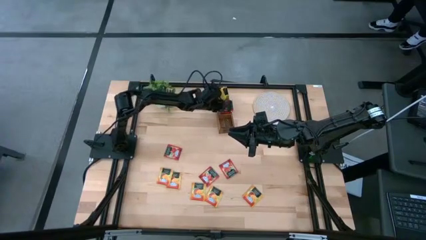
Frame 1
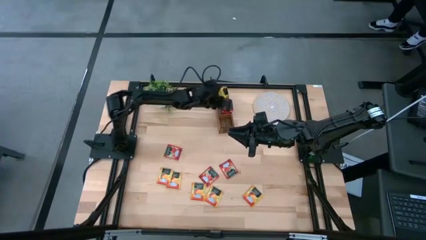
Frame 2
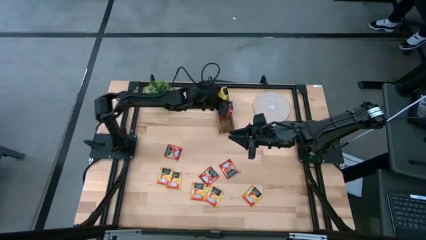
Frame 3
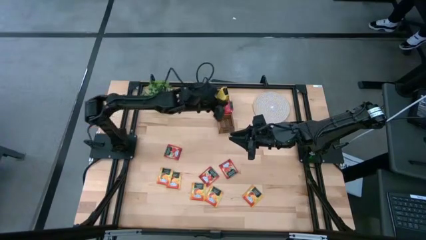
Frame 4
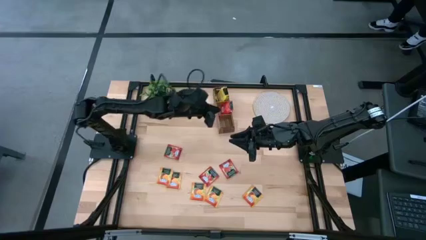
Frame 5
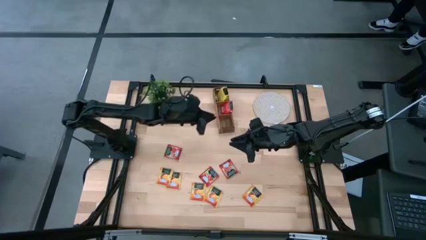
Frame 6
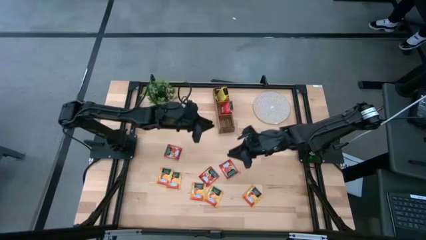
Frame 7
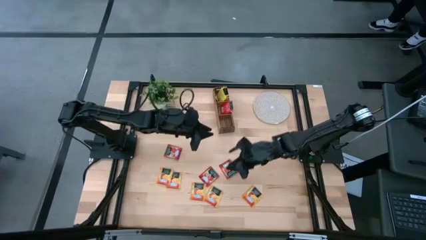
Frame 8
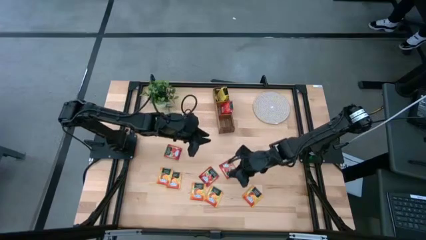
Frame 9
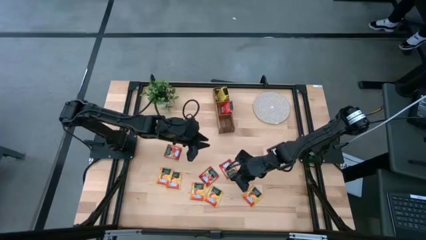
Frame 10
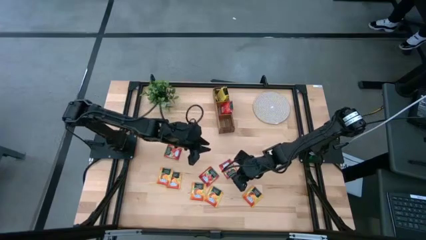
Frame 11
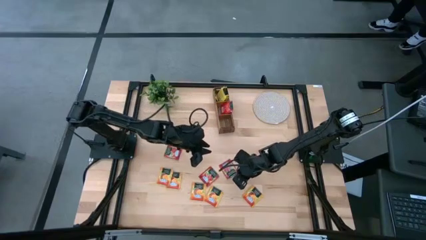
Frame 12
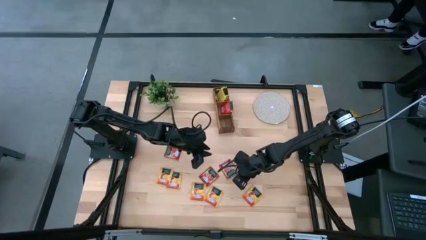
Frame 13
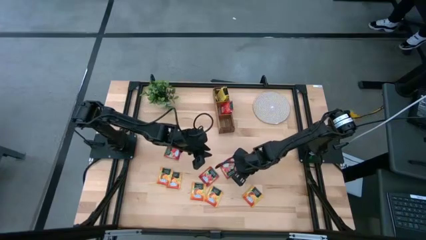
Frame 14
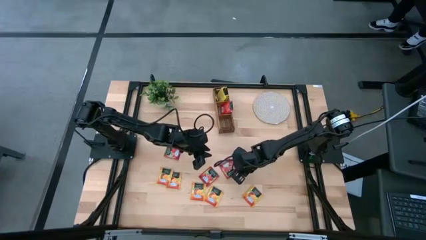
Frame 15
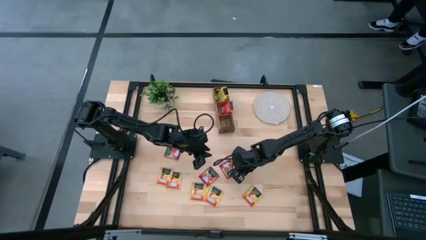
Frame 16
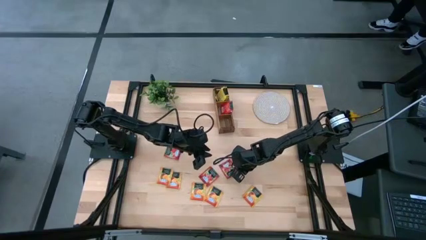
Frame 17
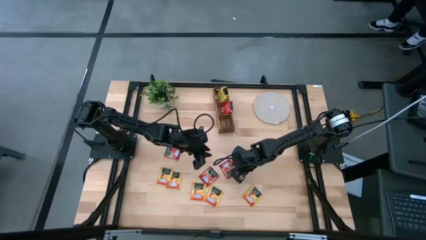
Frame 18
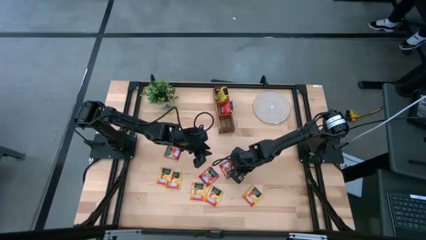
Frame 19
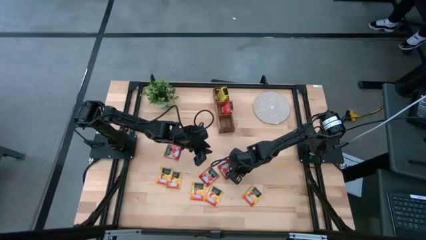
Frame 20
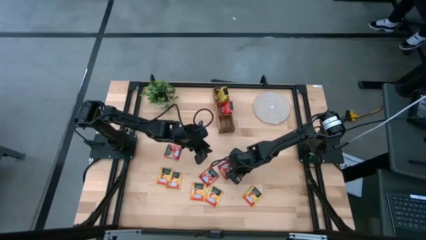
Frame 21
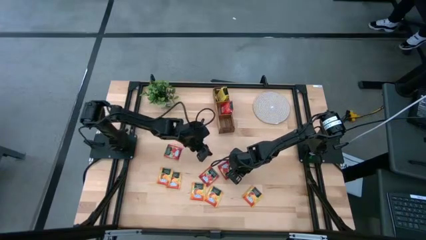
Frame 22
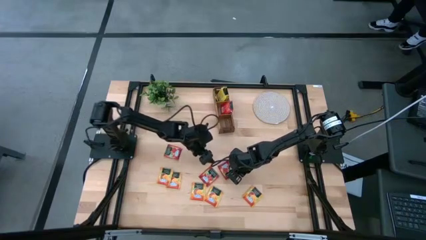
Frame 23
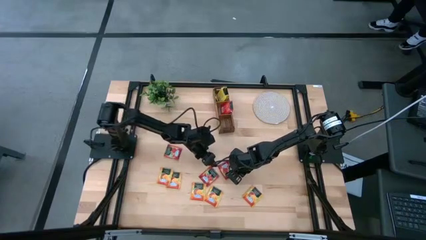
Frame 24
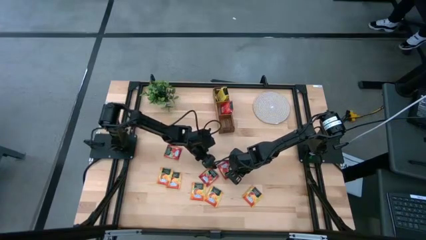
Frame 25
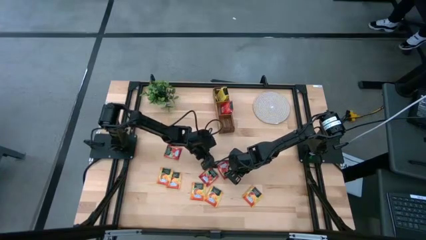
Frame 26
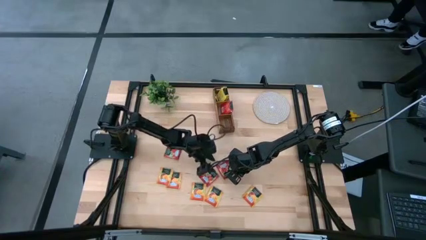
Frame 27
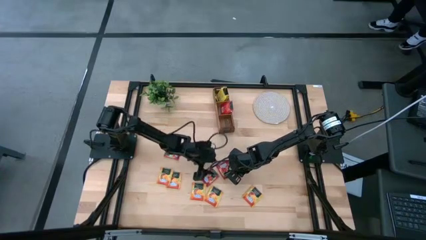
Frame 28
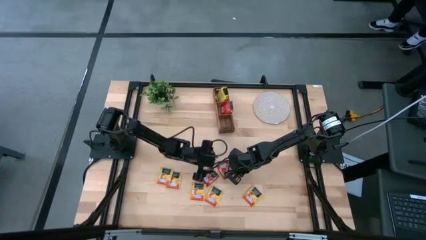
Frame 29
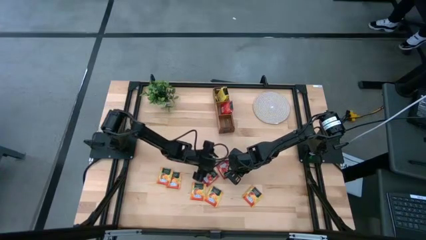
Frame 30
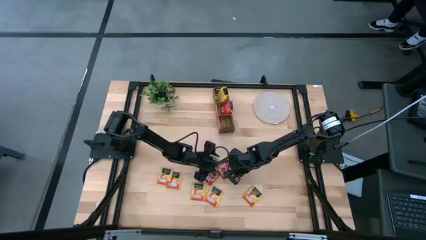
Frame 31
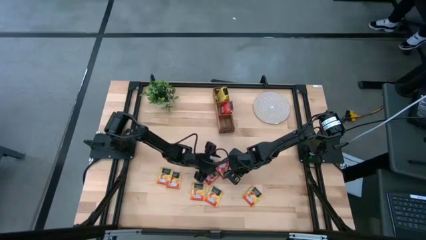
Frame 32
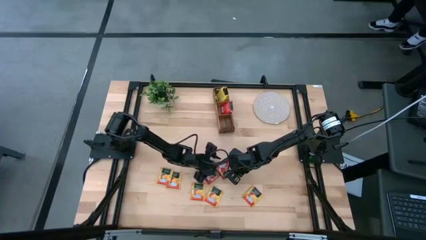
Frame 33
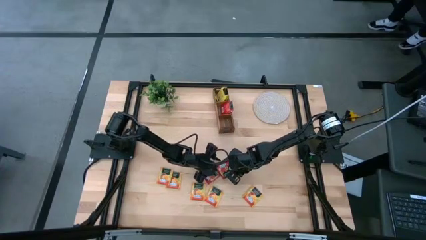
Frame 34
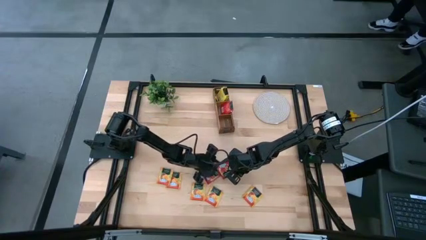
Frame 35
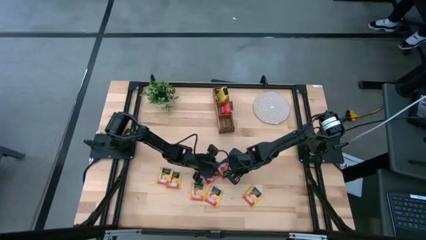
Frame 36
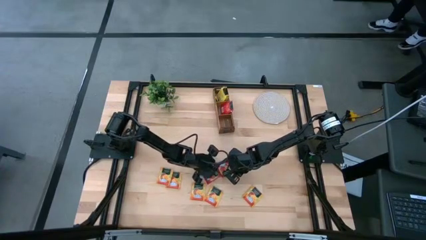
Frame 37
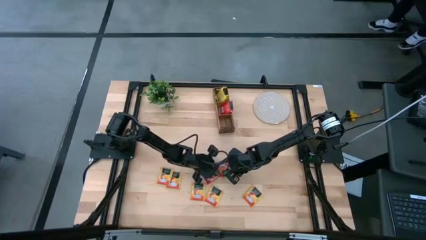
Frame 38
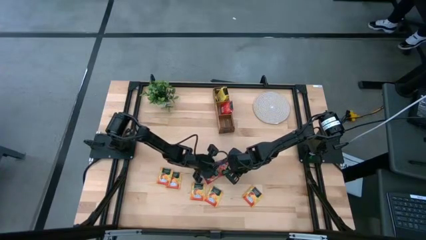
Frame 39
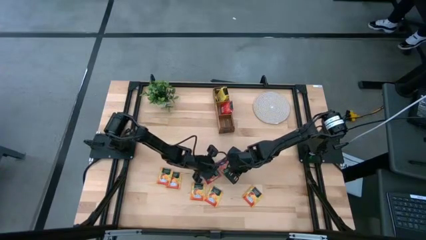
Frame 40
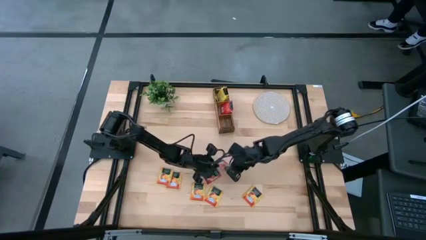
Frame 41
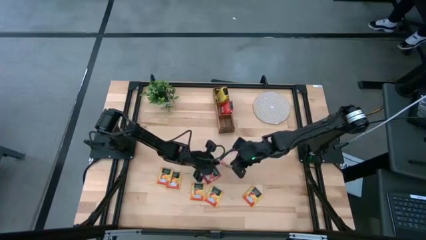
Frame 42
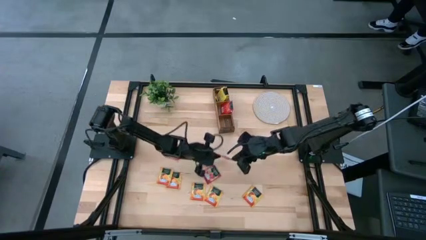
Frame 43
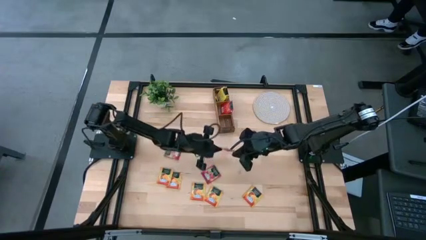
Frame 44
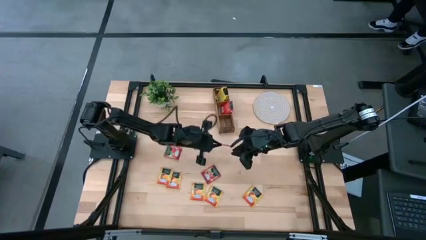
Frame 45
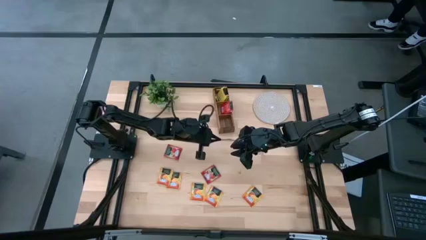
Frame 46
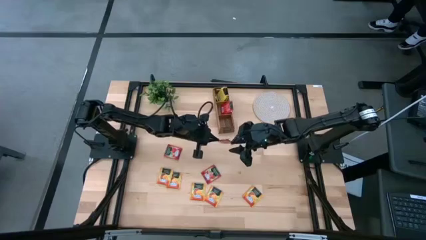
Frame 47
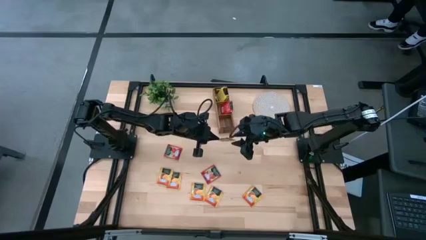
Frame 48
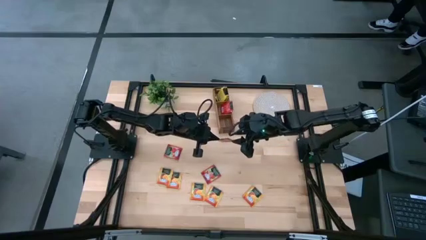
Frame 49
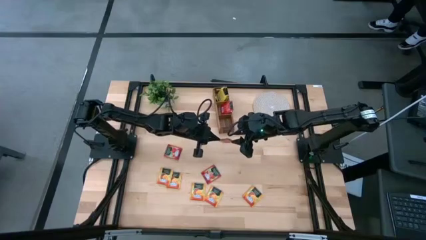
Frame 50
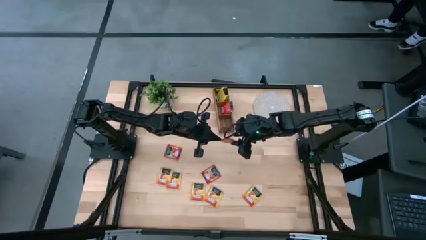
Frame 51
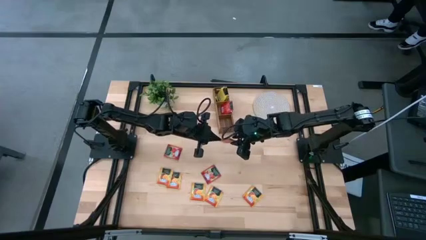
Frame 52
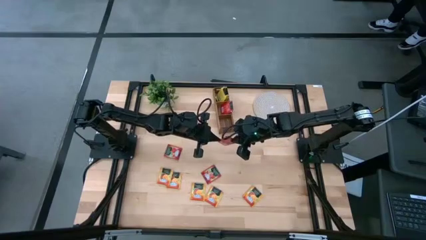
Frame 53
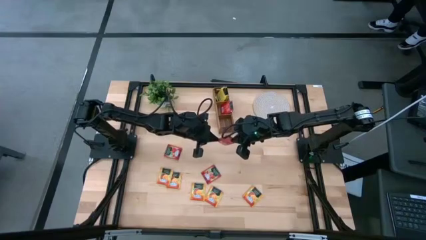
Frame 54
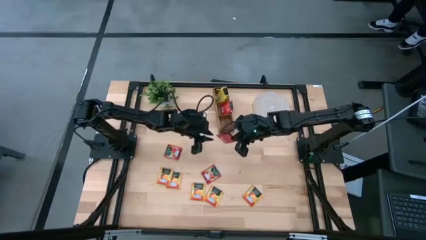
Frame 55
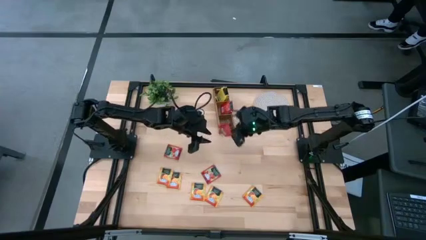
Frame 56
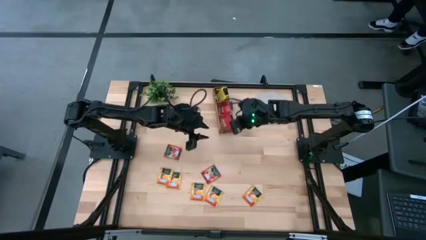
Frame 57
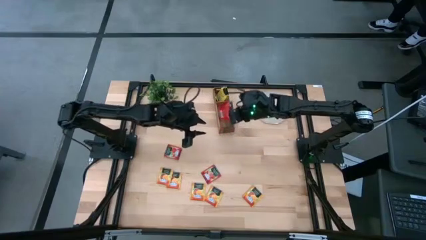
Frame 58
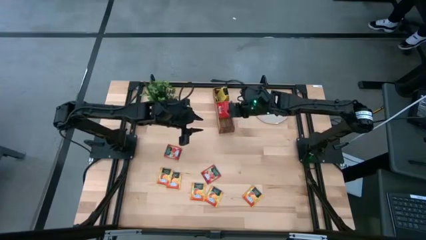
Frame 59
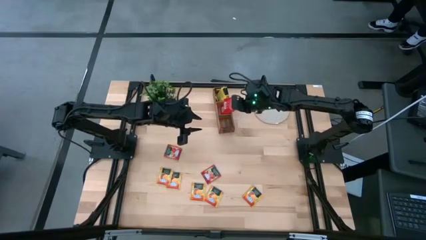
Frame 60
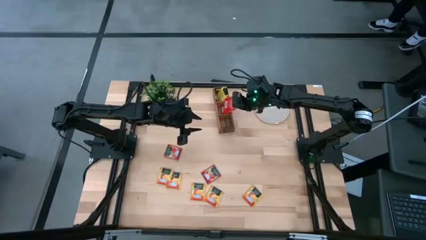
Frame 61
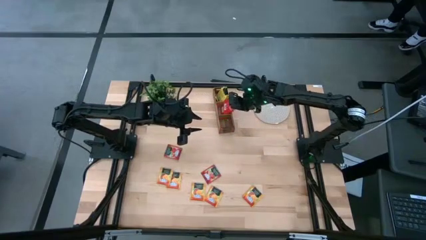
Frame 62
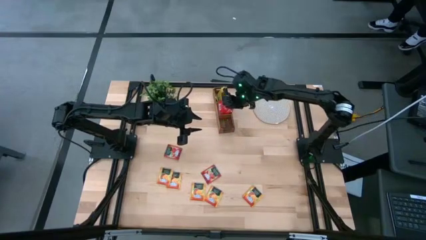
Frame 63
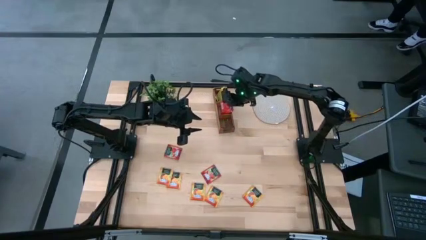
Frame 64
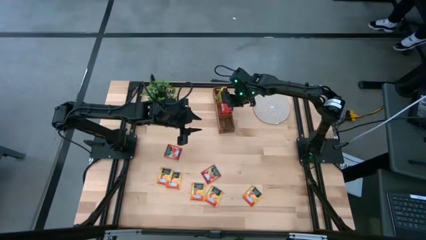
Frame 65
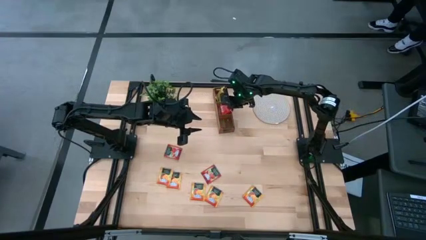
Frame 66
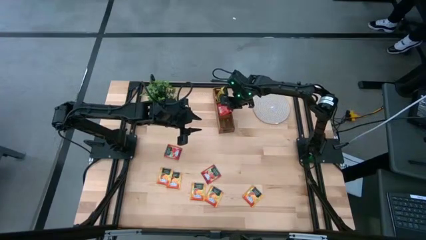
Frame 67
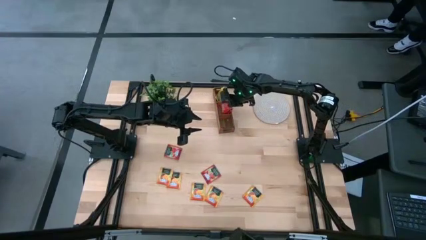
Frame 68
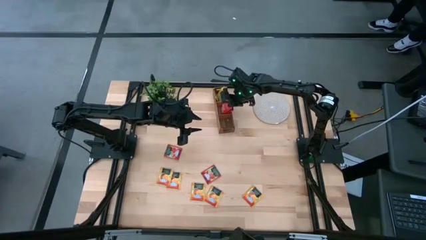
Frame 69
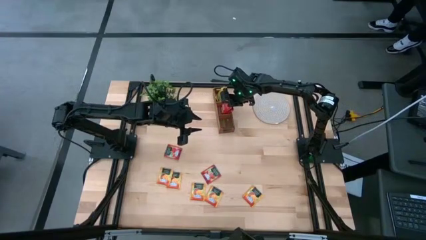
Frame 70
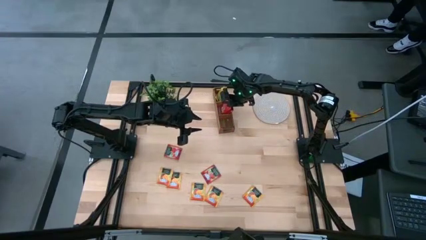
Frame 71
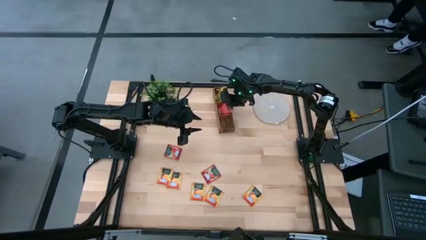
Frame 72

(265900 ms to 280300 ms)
Task: Pick & Place Tea
Put the red tea bag into the middle section of the wooden organizer

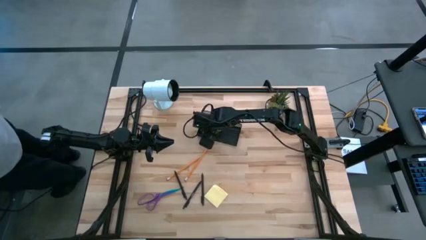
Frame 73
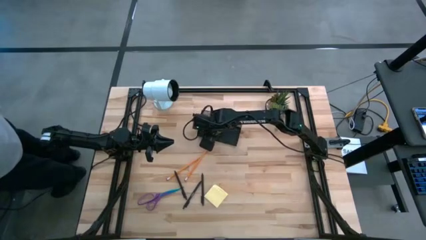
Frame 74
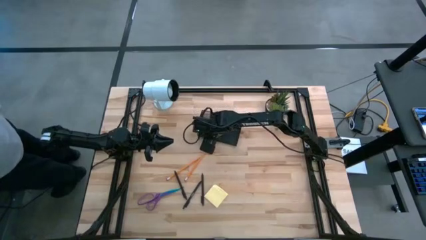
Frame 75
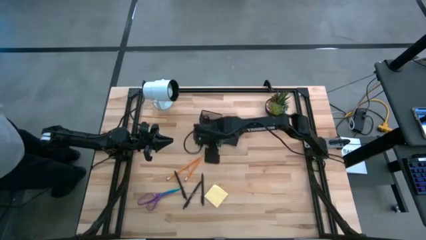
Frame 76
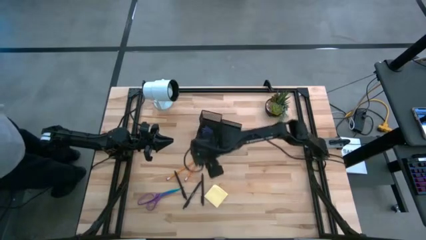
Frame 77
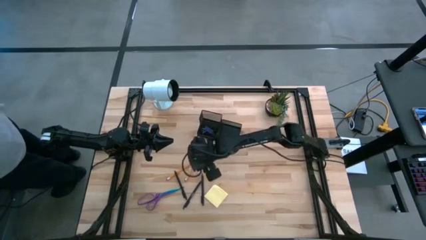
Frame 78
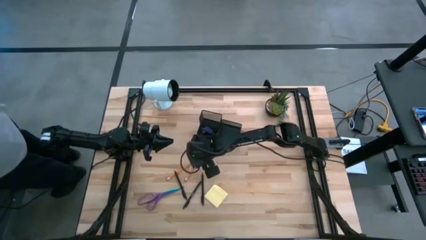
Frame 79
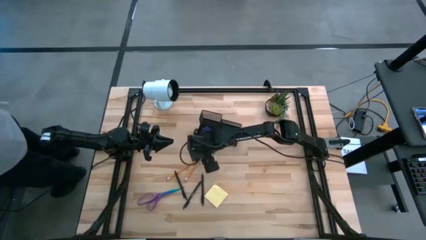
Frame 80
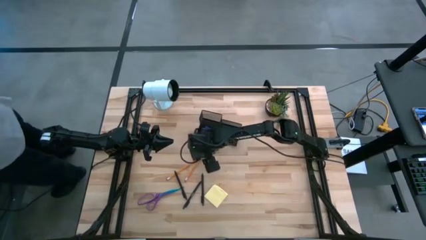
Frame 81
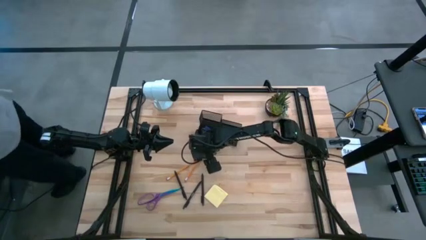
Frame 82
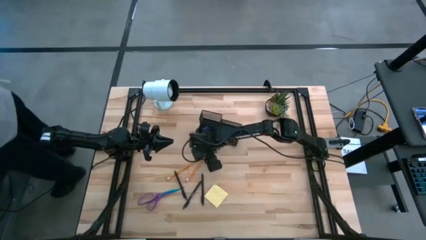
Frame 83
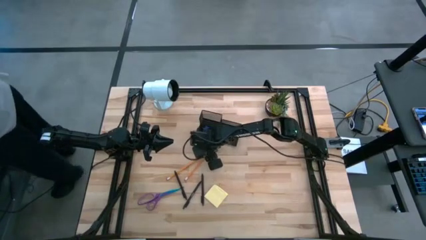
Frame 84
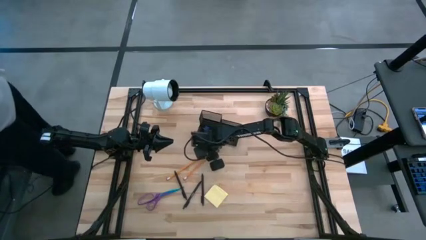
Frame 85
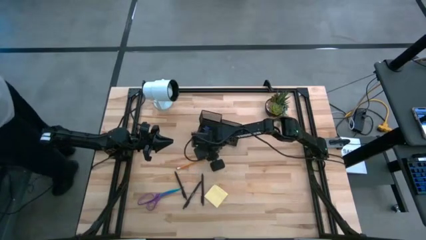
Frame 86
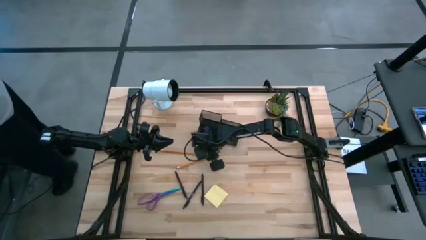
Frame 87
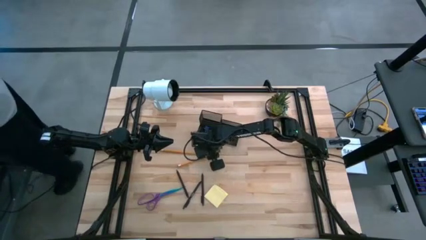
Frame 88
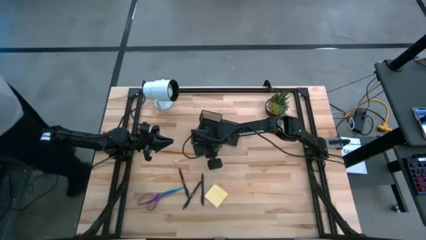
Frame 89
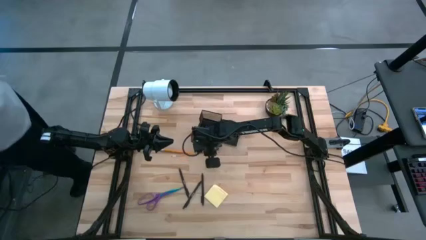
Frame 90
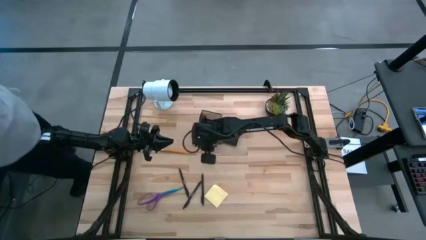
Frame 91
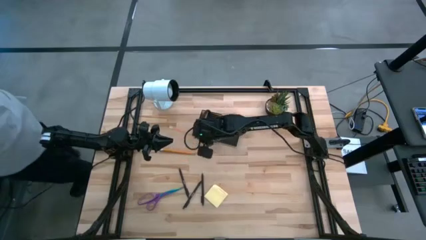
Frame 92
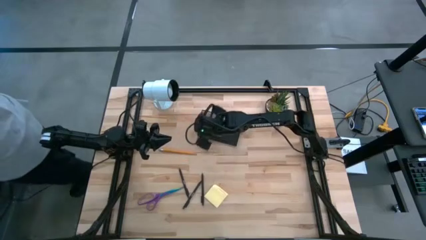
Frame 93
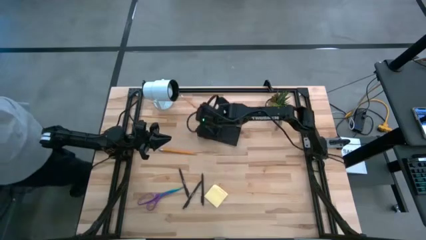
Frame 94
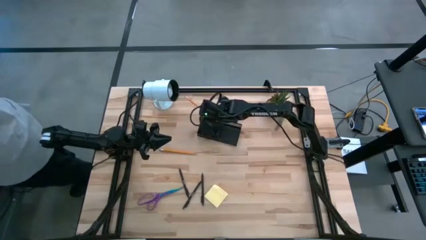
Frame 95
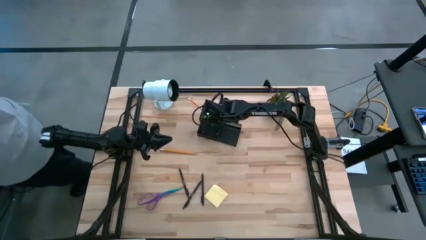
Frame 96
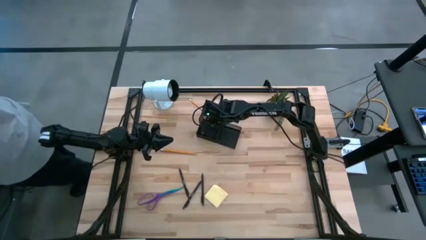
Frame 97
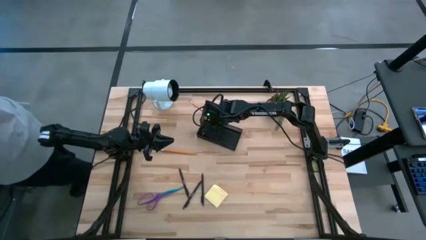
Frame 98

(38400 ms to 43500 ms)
Task: Pick and place office supplies into organizer
Put the right orange pencil into the black desk organizer
